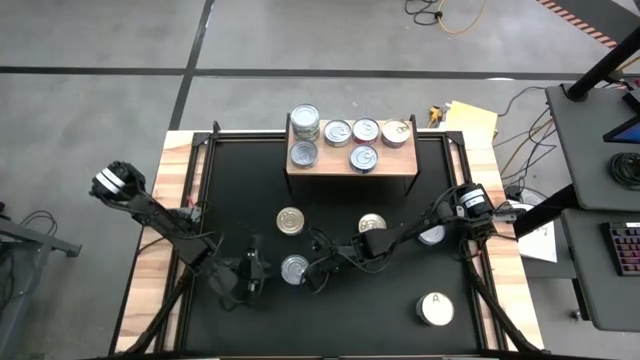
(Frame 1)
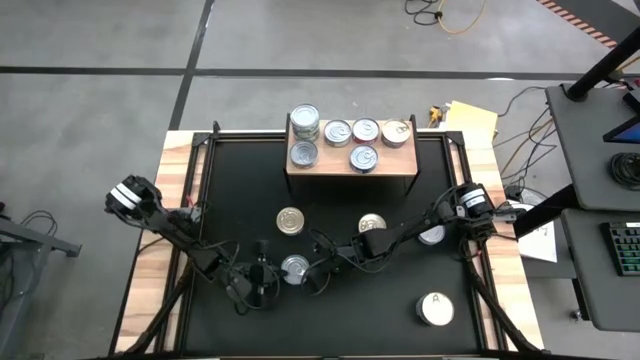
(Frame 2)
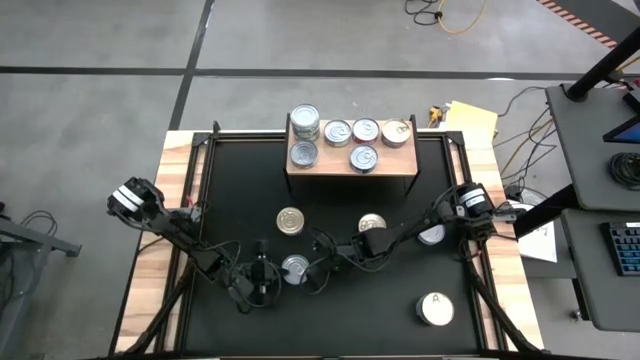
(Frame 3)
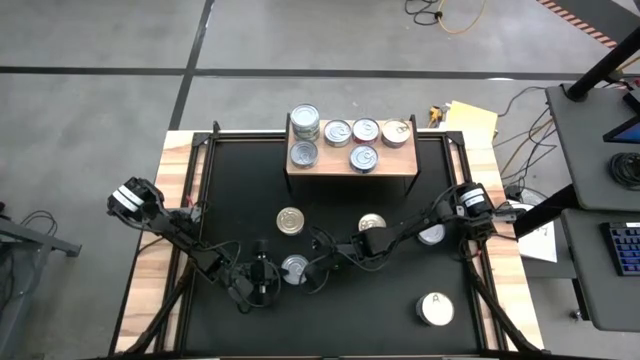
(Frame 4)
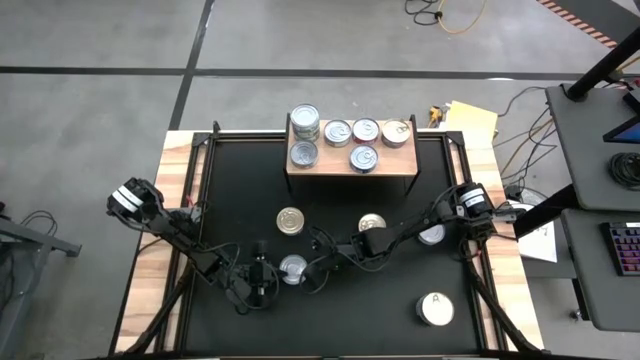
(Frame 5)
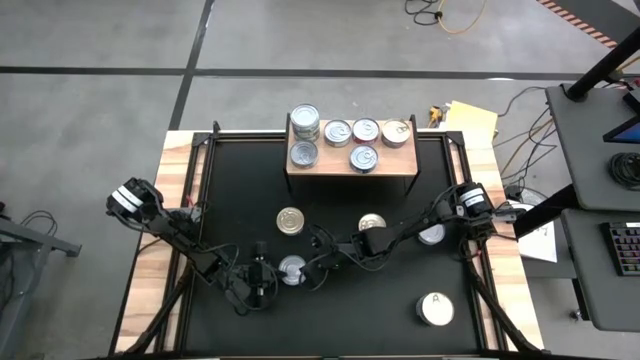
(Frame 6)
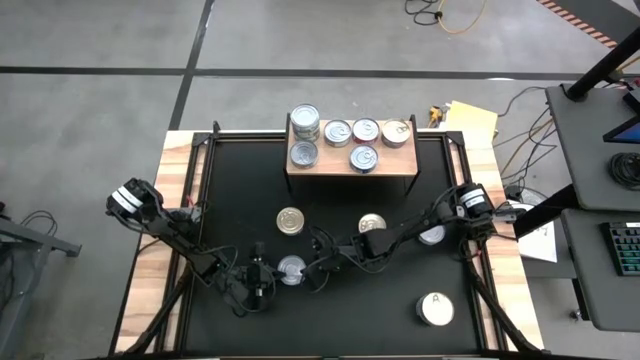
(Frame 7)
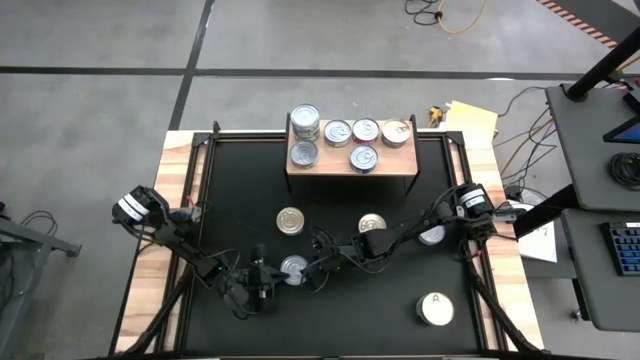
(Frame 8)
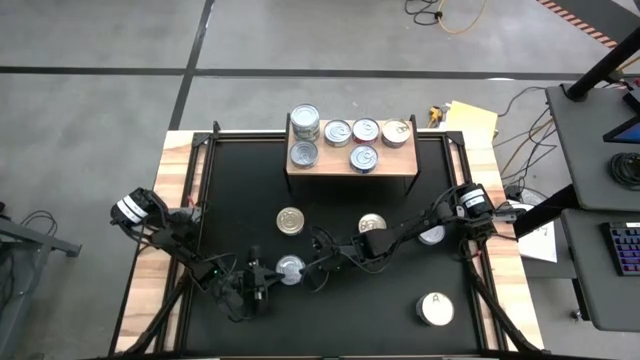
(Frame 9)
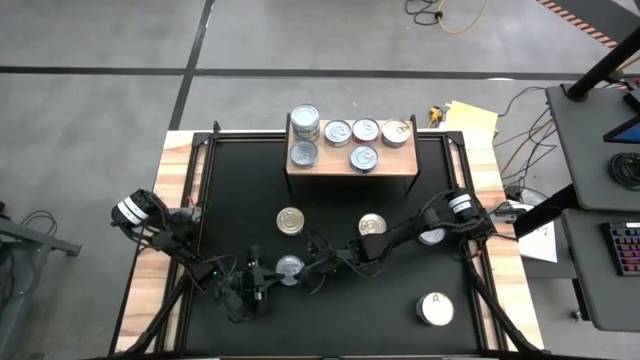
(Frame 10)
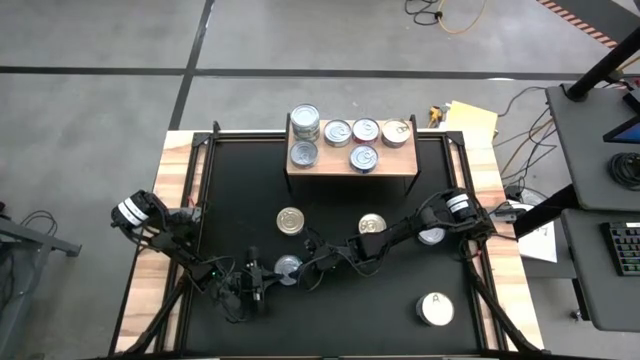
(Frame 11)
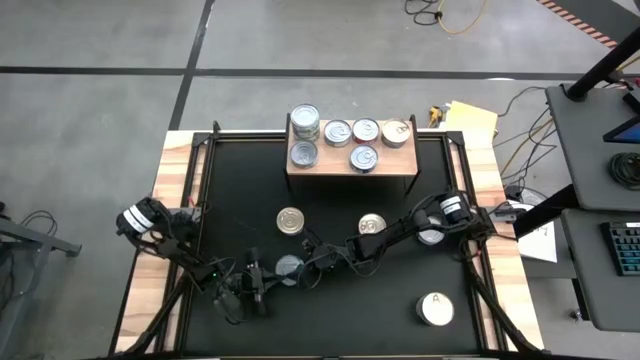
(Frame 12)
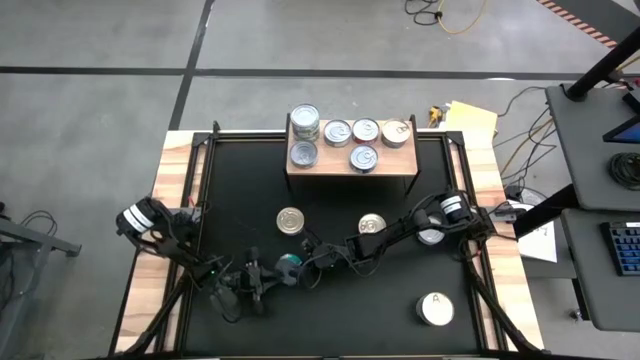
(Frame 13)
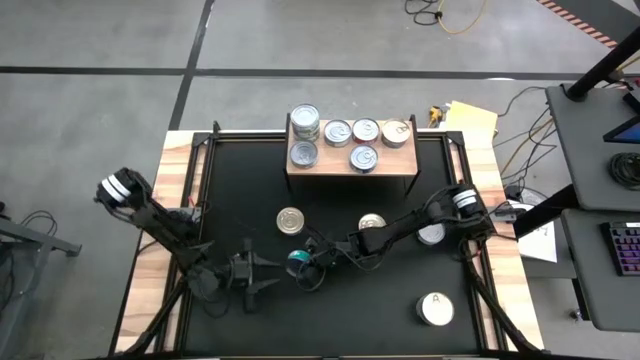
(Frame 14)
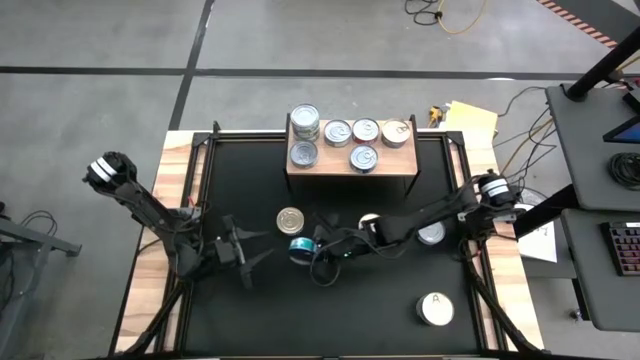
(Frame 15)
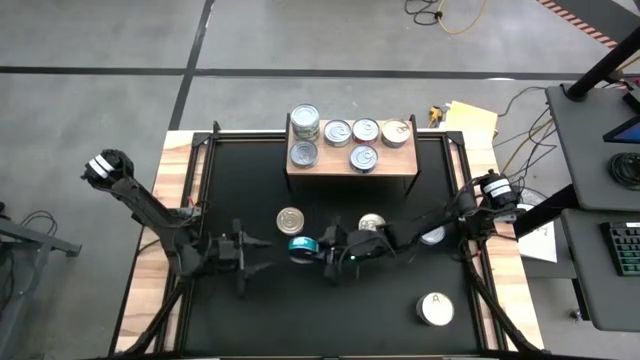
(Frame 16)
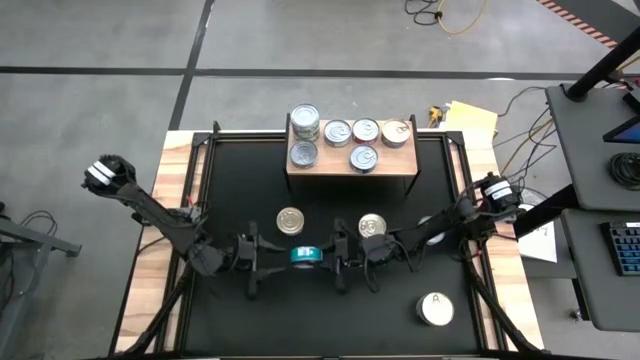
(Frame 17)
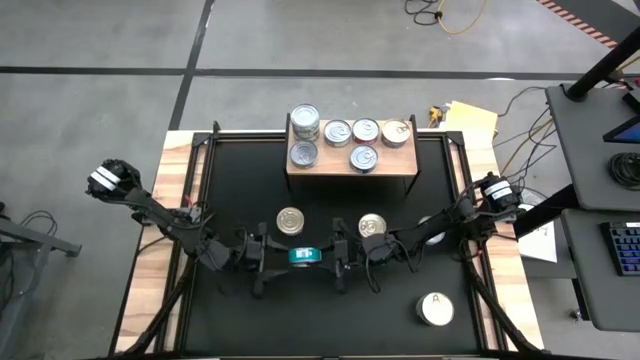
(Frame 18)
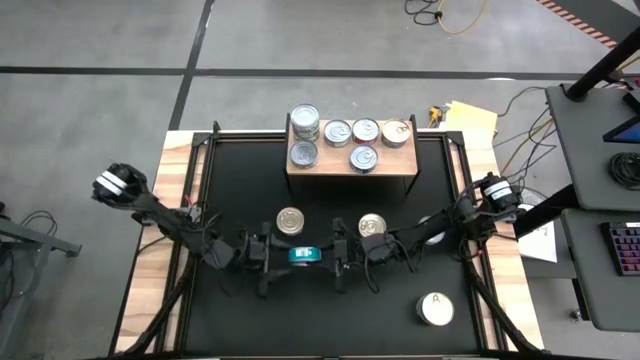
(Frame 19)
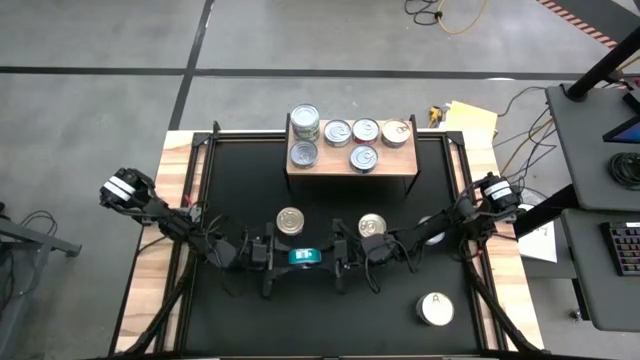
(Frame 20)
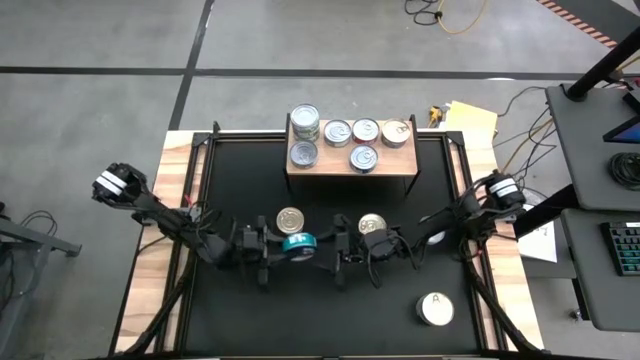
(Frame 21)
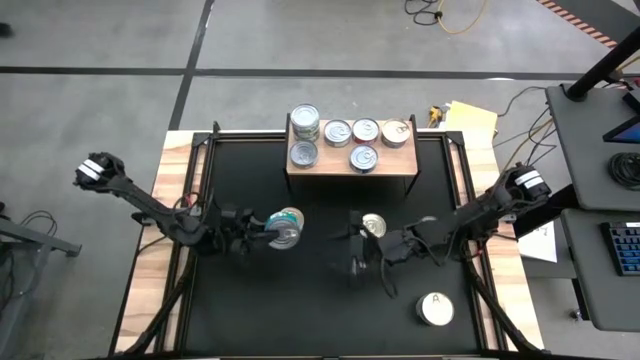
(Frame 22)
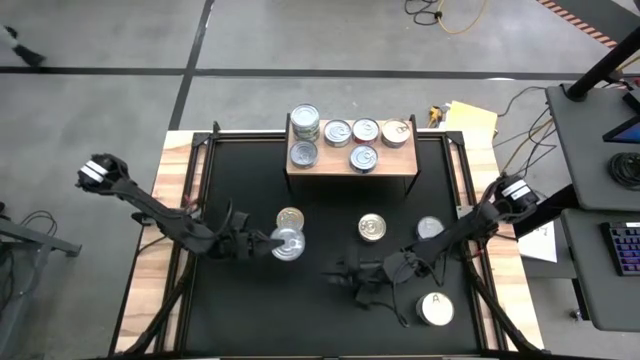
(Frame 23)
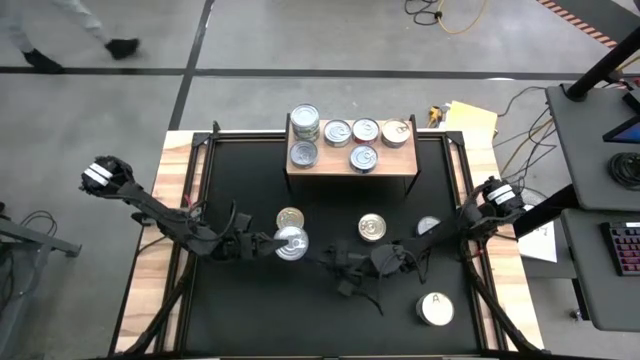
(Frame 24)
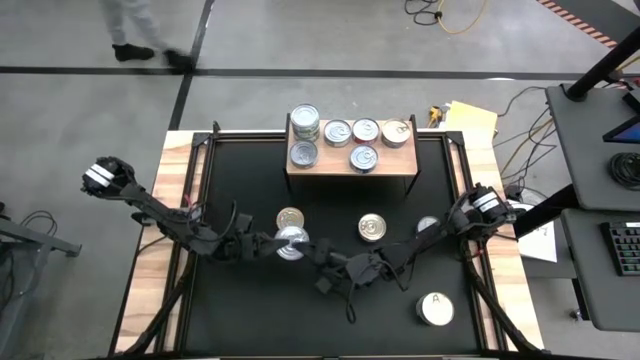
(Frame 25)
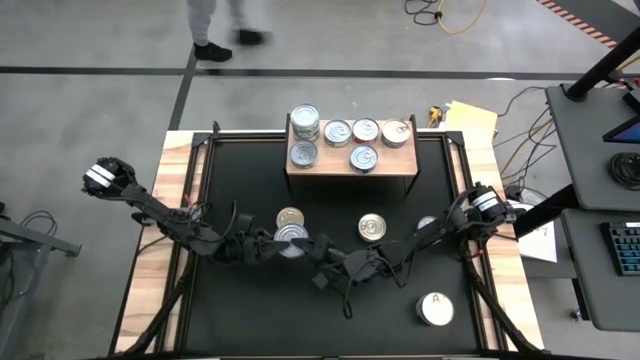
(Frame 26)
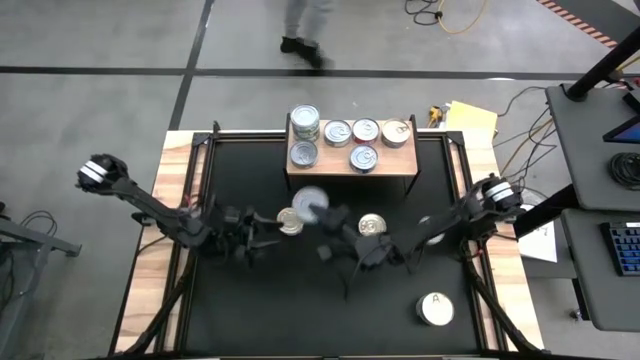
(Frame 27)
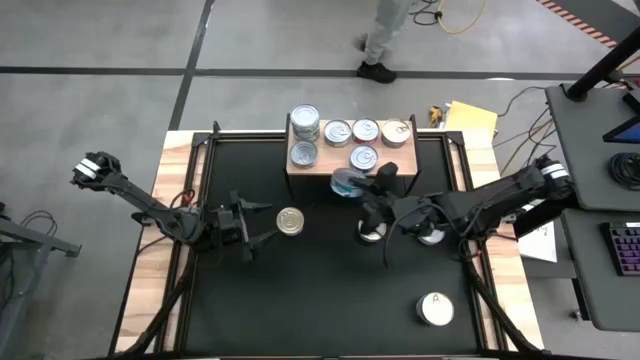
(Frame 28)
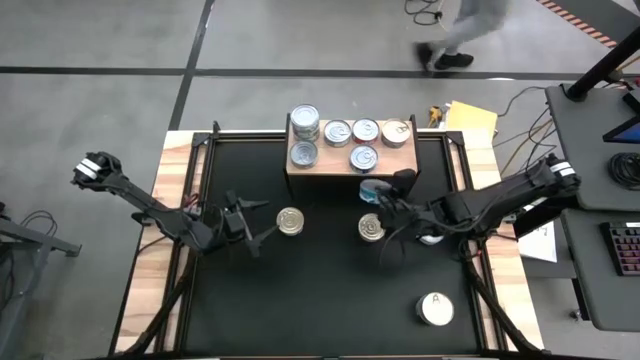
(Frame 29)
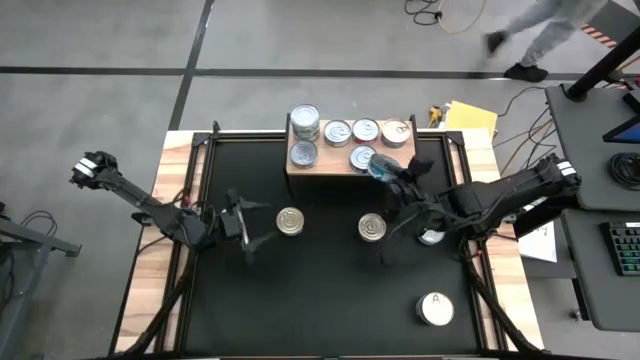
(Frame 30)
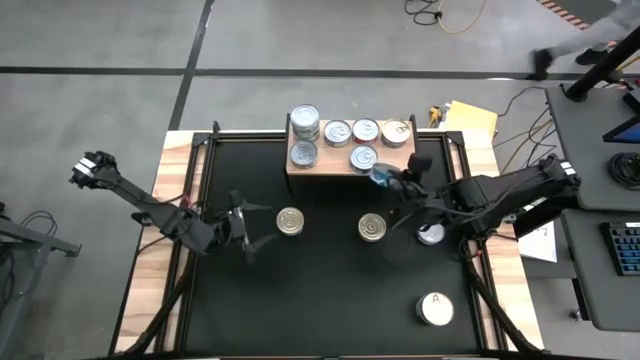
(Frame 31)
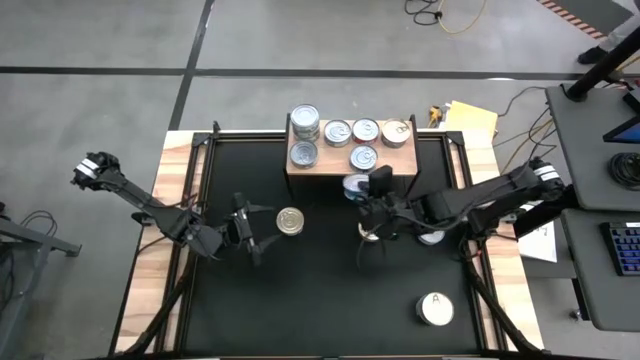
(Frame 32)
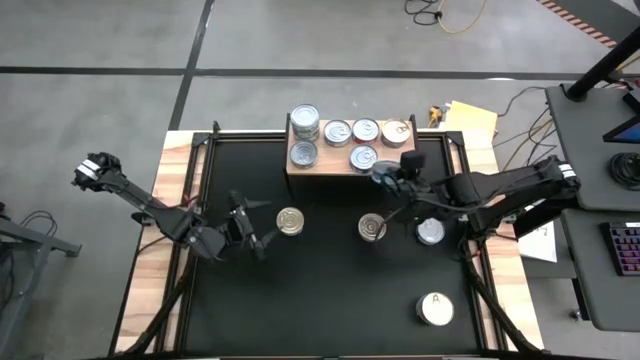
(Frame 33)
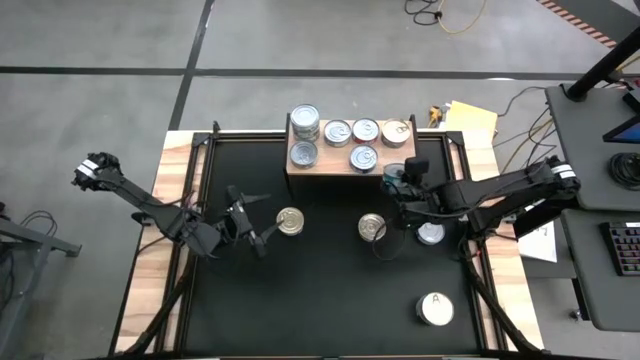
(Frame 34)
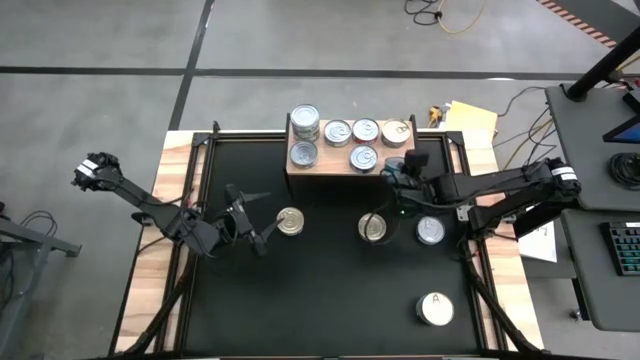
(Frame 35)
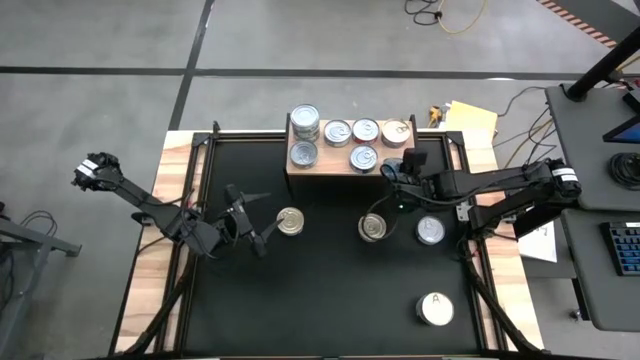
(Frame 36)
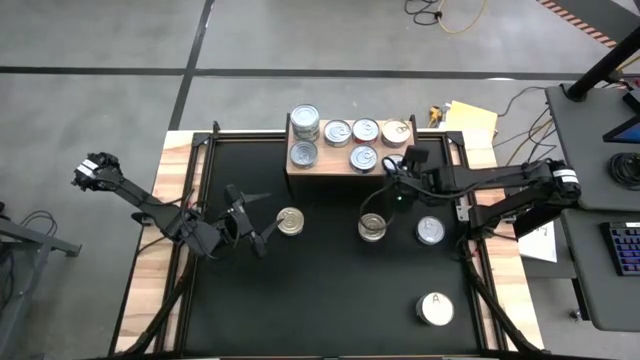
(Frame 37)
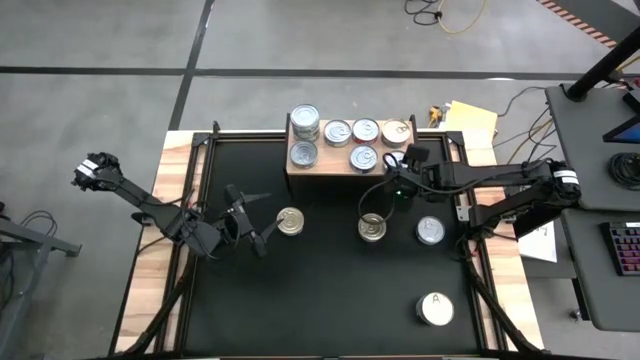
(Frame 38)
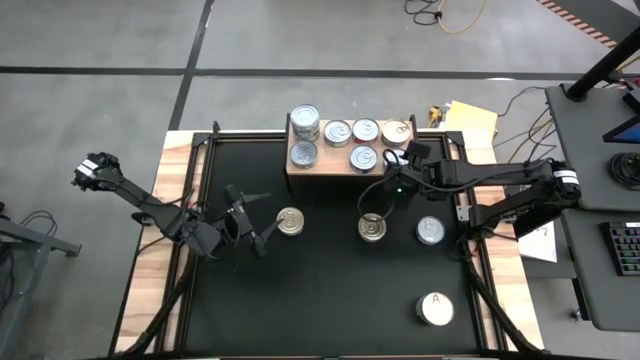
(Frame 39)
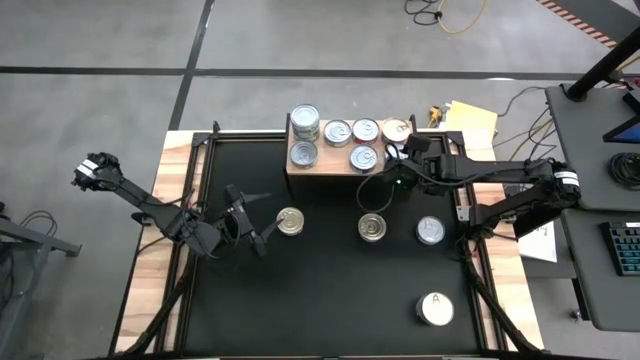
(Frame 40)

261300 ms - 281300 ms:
Task: Stack canned seafood by type on shelf
Put the green blue tuna can on the shelf
